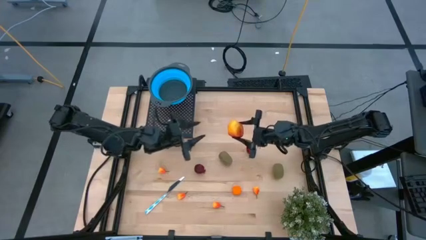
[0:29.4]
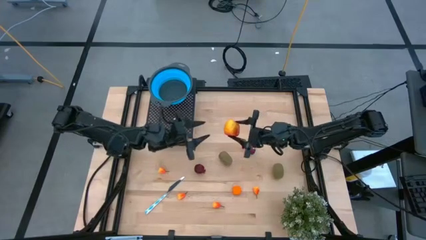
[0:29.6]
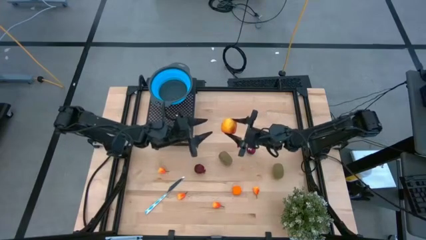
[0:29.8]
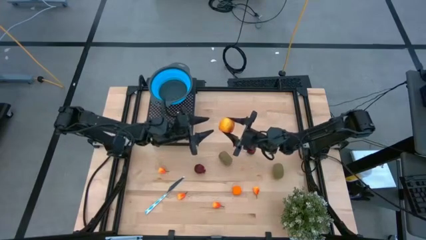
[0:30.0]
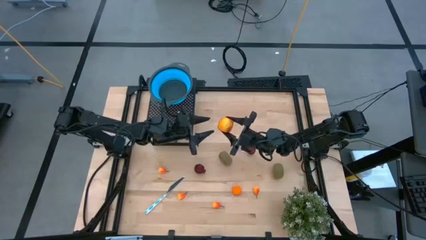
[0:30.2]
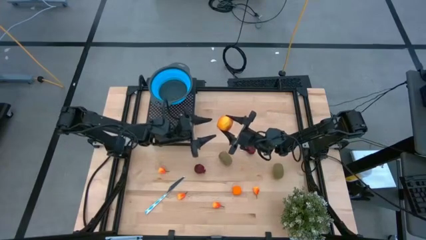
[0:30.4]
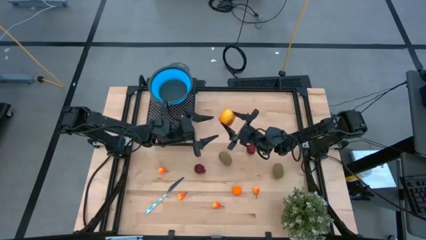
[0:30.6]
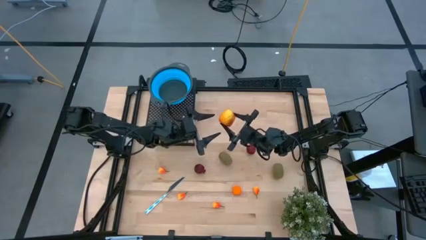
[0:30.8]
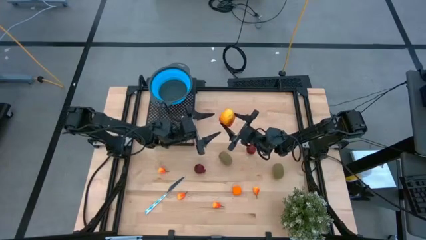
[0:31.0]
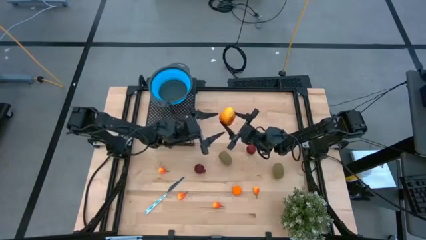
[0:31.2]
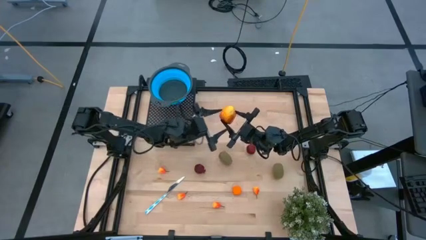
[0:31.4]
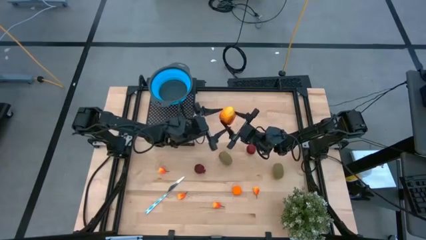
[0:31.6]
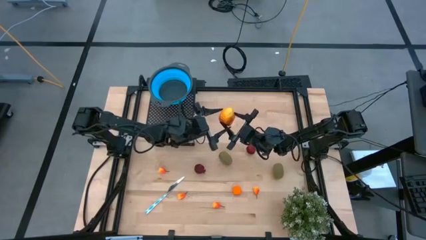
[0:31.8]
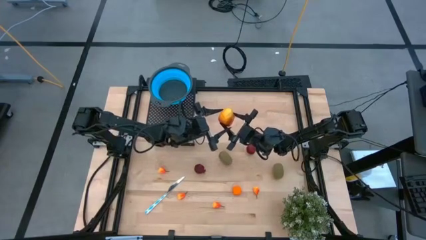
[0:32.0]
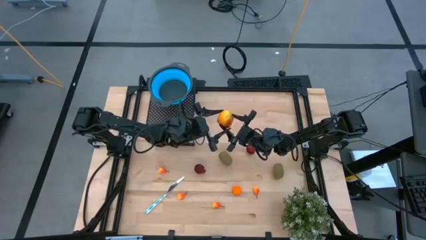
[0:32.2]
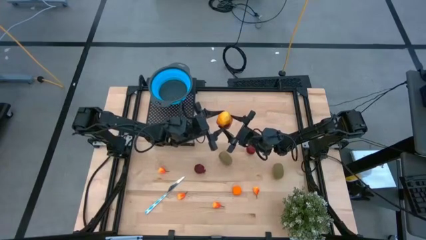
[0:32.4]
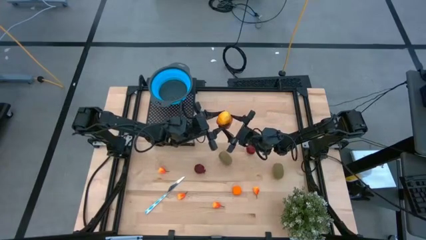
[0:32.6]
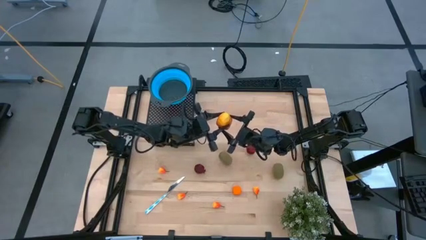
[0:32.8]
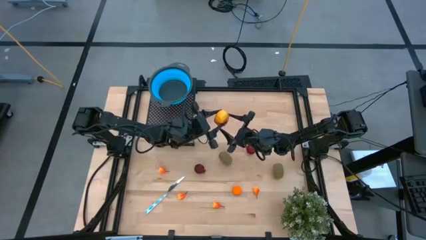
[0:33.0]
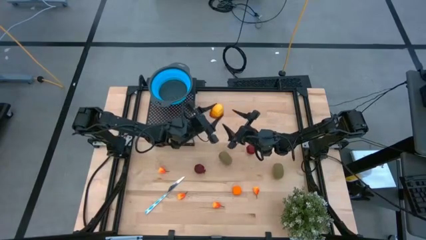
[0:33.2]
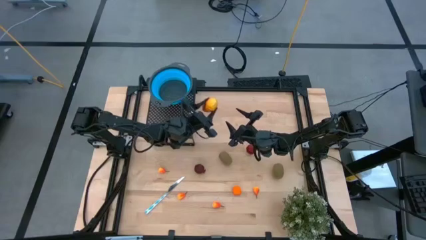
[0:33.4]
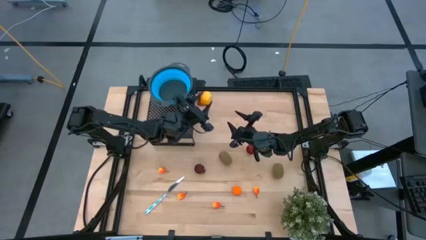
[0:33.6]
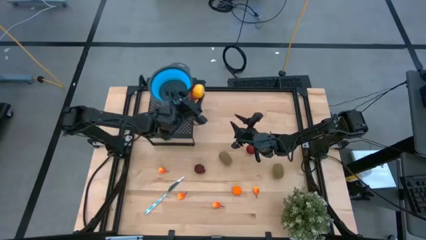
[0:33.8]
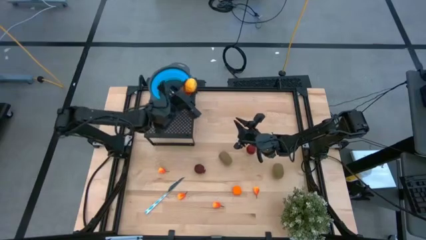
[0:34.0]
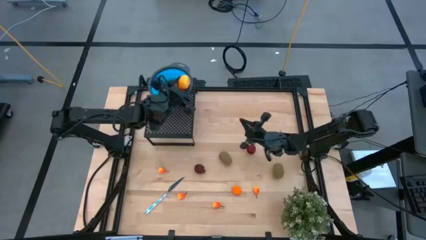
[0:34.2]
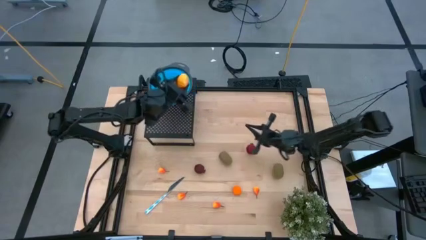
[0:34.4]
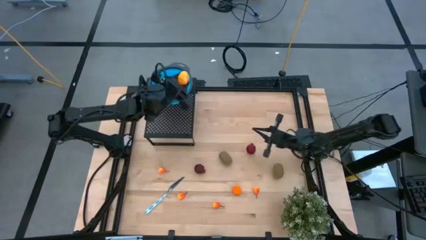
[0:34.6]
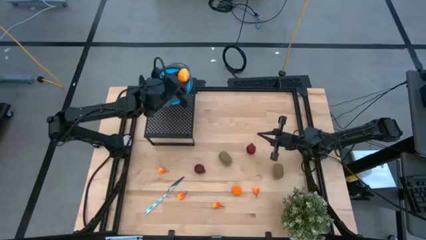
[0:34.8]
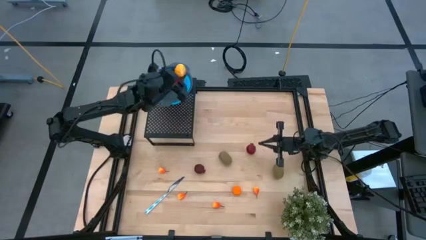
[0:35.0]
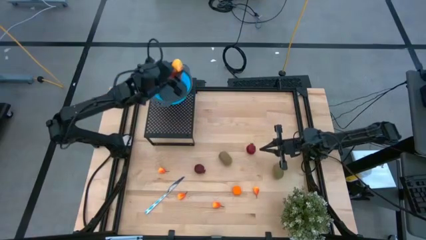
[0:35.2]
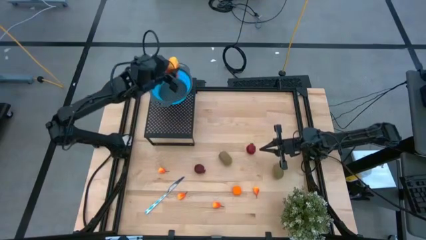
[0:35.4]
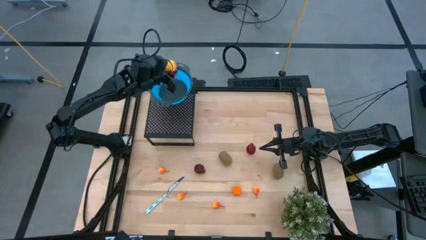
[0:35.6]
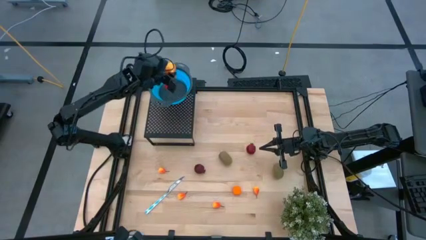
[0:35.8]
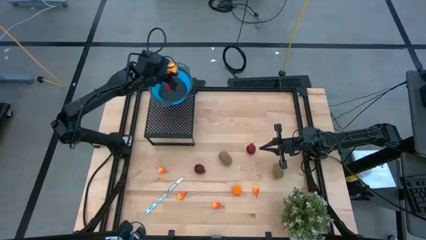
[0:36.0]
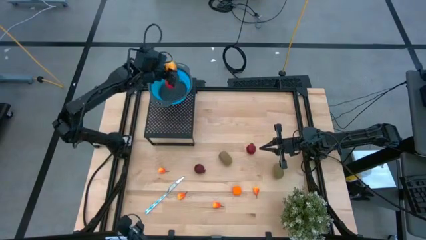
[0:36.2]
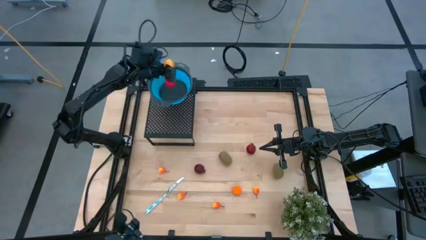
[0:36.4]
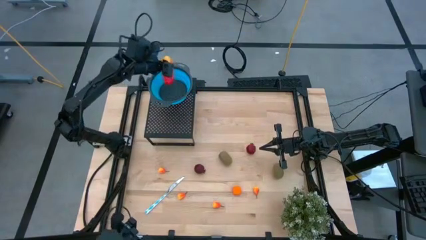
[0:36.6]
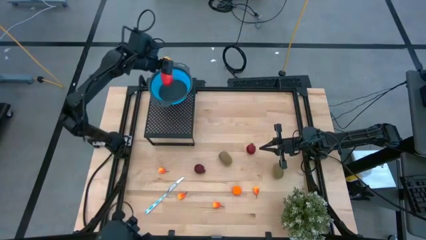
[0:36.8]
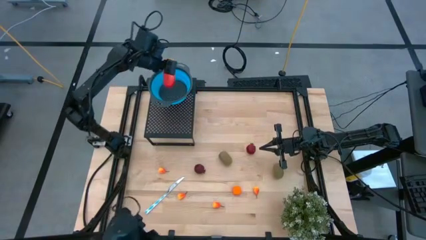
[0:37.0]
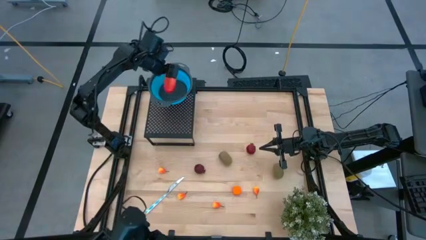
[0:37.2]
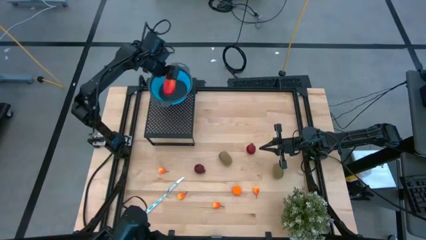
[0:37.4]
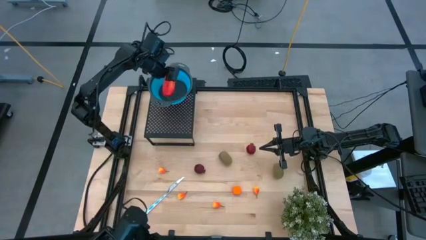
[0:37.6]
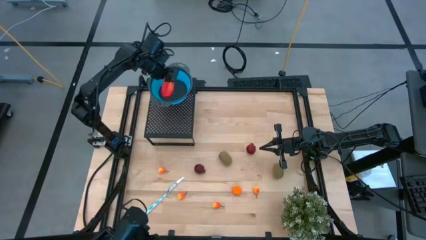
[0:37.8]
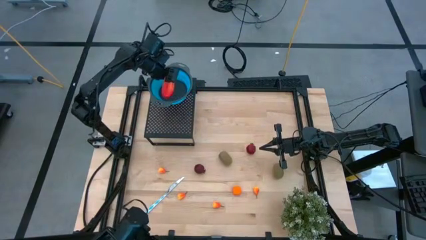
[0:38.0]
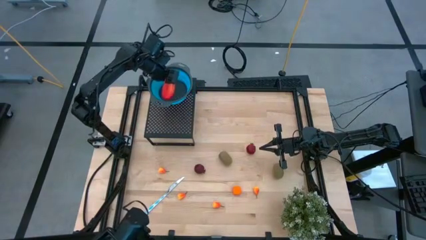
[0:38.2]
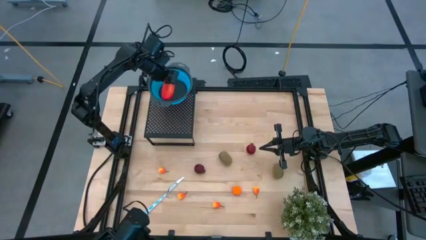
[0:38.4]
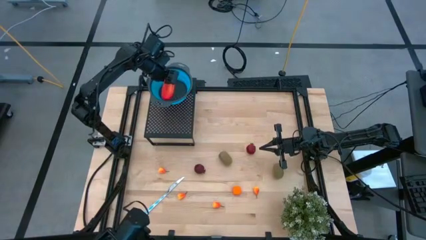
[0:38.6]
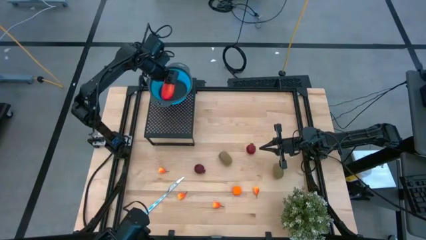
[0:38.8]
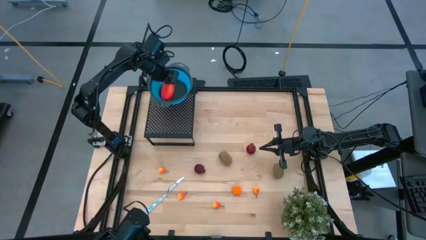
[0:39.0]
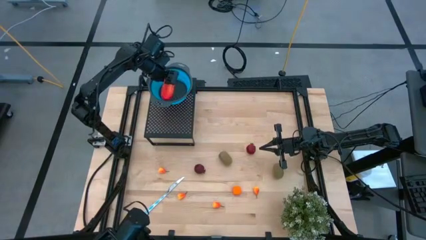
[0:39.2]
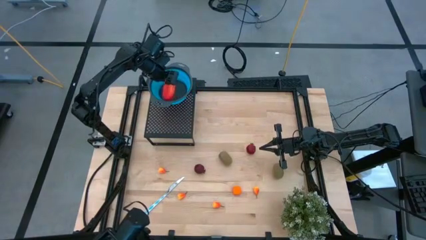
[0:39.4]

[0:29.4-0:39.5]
Task: Pick & Place Fruit
Put the orange mango into the blue strainer bowl on the shelf

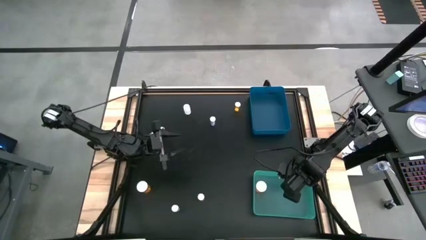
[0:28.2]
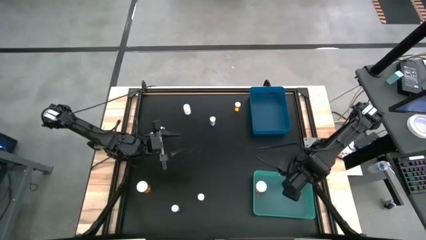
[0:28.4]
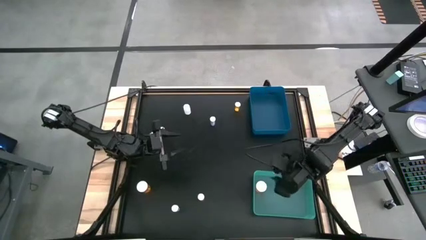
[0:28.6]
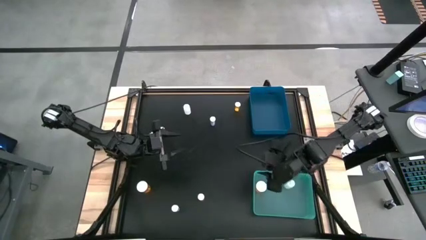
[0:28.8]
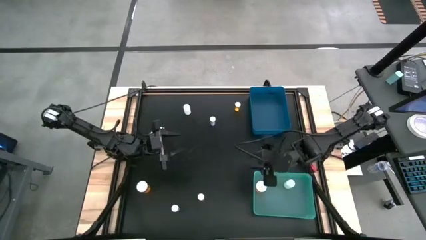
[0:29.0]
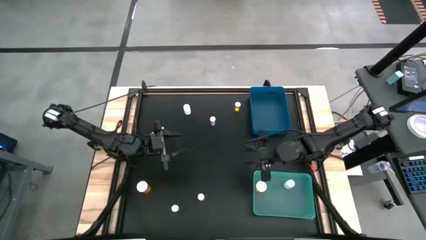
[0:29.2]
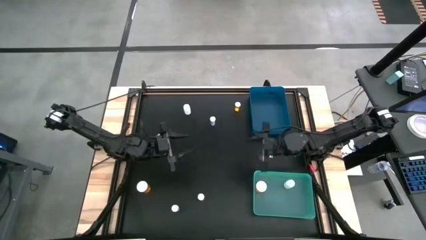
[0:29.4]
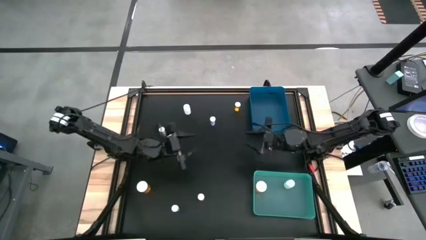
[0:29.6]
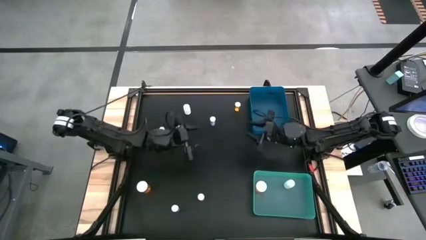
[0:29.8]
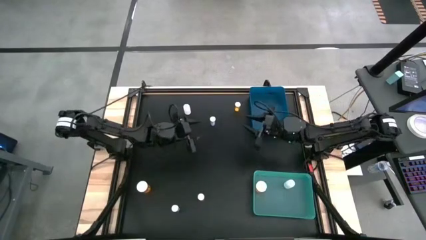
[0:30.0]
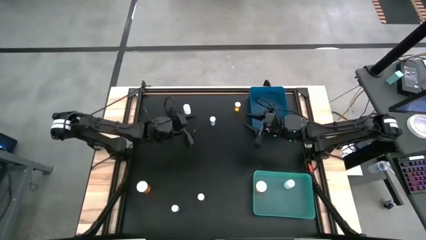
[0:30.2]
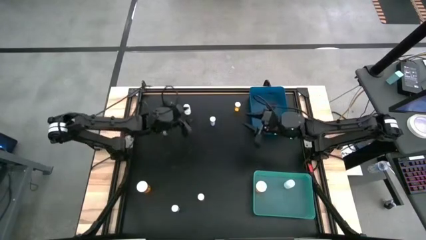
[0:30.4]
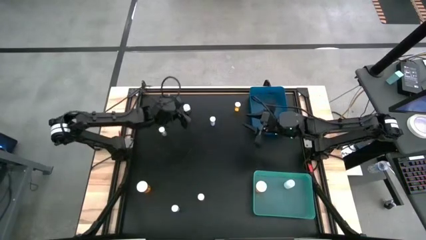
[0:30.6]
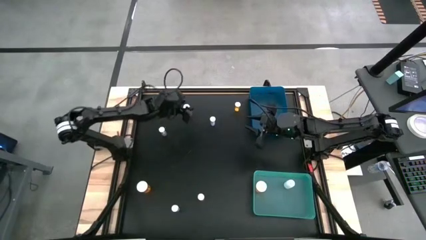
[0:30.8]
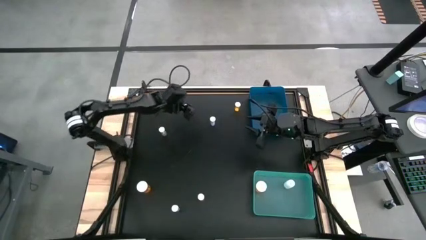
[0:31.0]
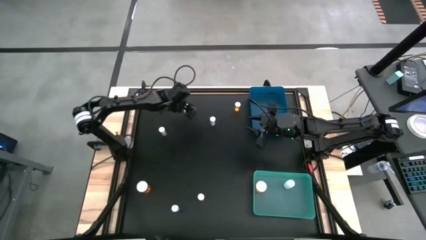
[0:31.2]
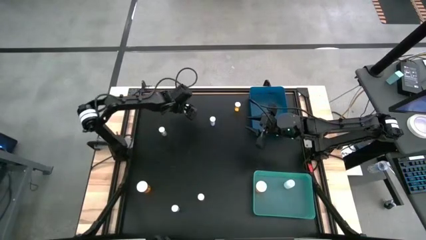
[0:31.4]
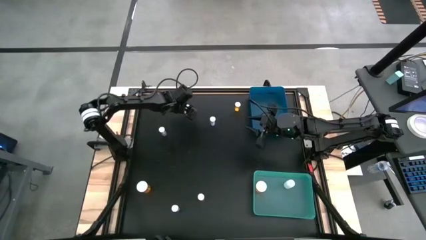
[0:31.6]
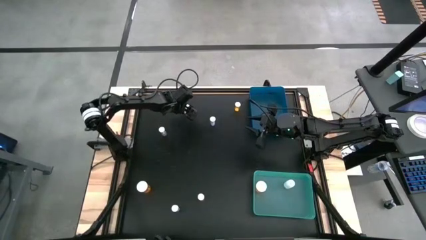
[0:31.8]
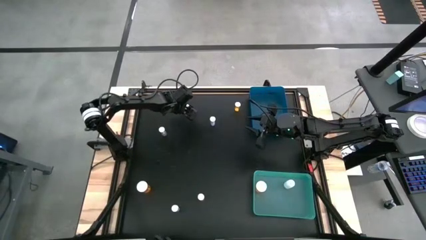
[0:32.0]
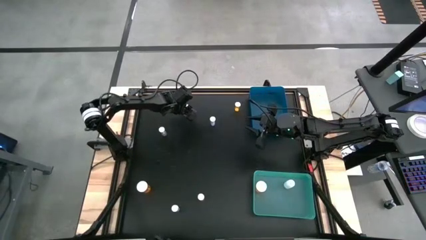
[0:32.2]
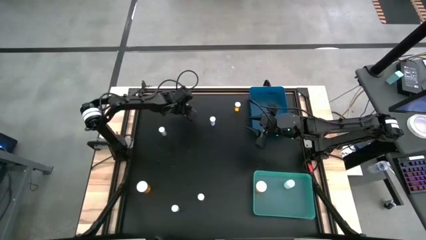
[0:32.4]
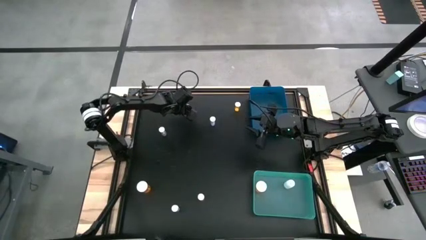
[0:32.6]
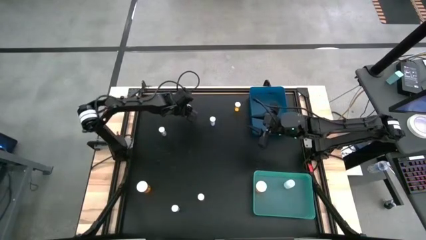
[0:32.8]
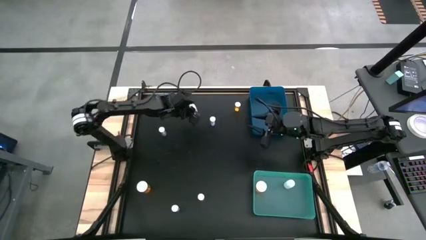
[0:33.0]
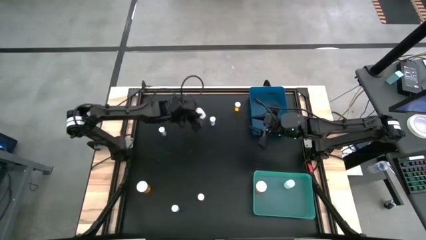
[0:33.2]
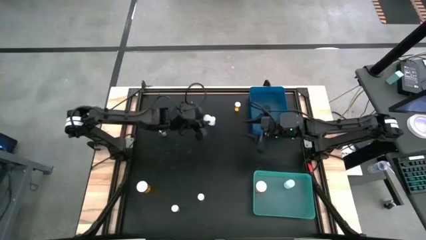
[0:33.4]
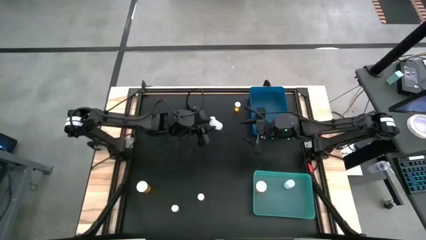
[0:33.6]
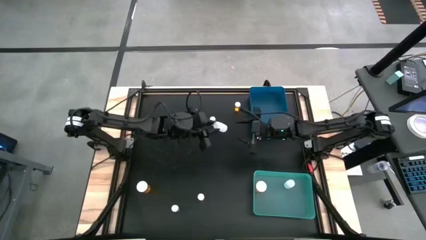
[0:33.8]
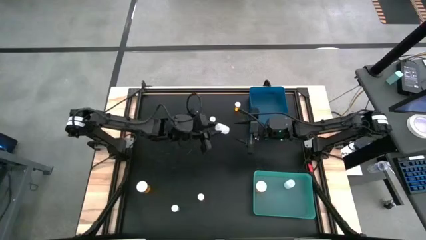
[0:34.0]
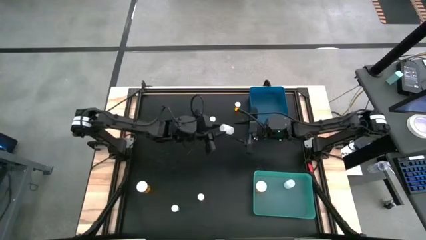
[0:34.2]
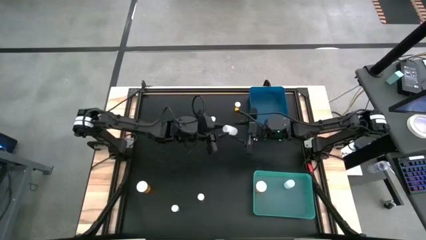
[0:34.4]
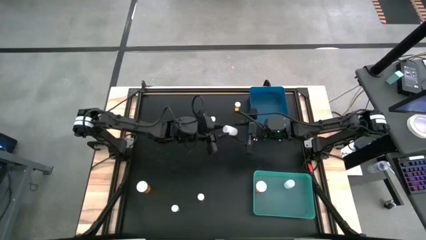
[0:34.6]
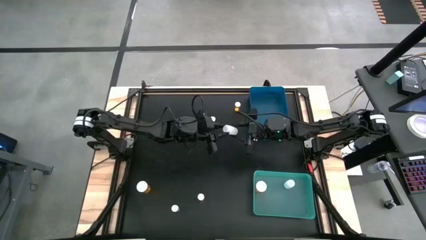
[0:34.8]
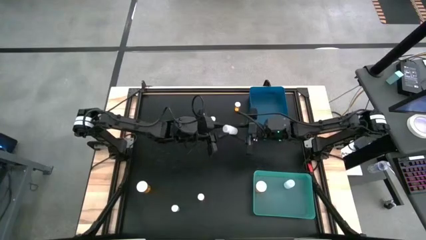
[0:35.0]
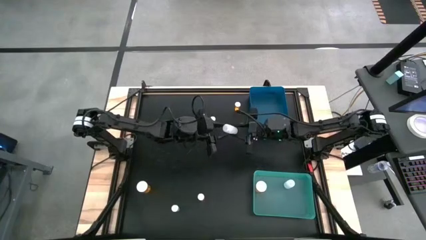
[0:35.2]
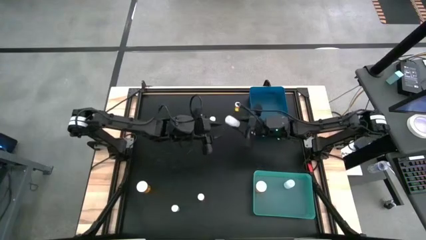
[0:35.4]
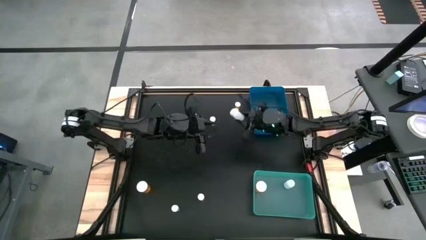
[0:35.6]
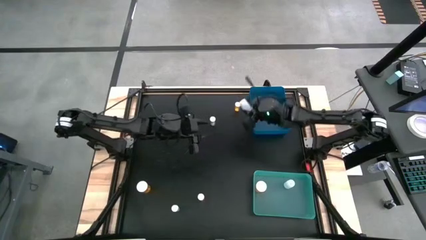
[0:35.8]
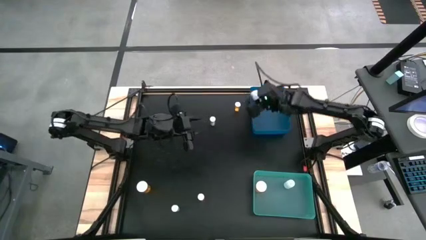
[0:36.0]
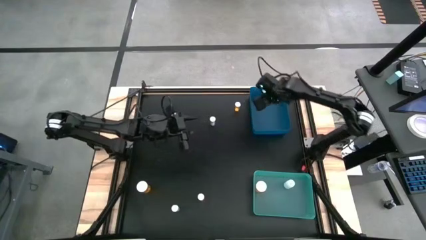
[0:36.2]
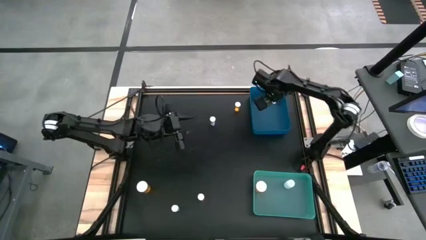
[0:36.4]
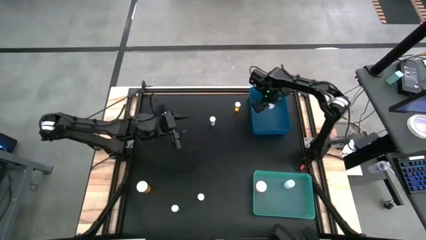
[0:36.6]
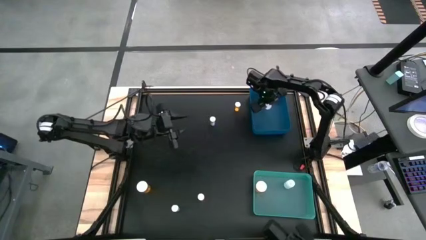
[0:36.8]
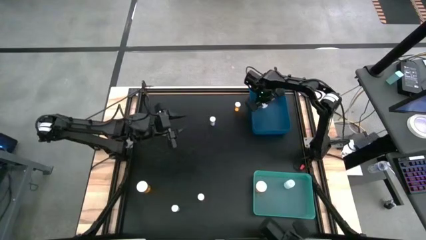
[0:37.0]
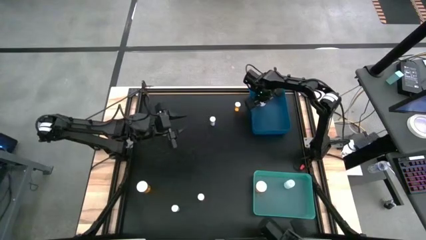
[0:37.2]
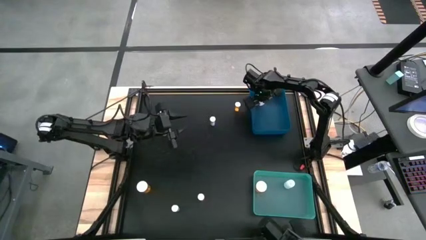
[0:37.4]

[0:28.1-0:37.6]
Task: Pick and place medicine bottles into bin by pill shape (circle, oval)
Put the white pill bottle into the blue bin
